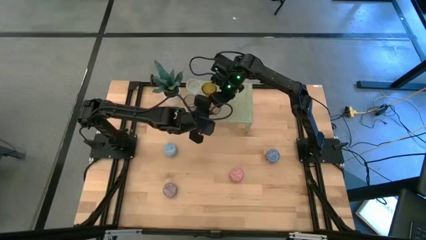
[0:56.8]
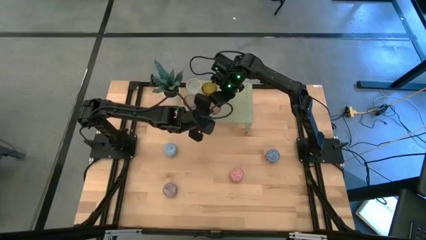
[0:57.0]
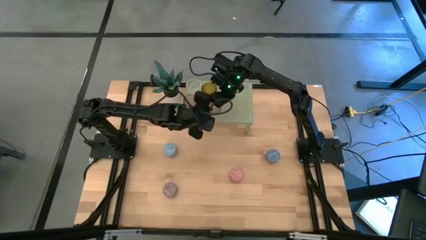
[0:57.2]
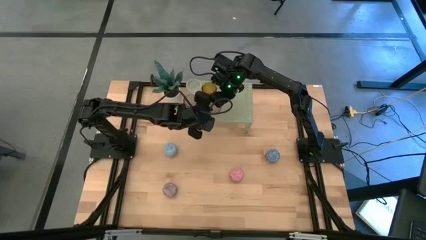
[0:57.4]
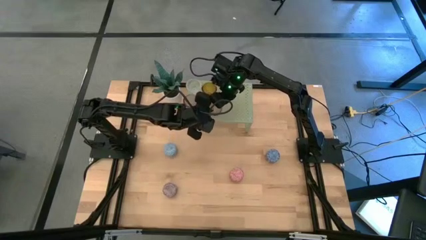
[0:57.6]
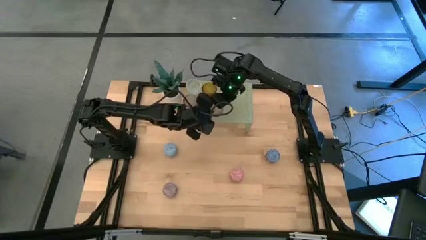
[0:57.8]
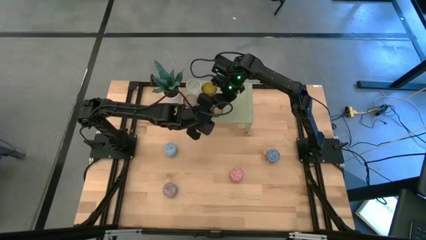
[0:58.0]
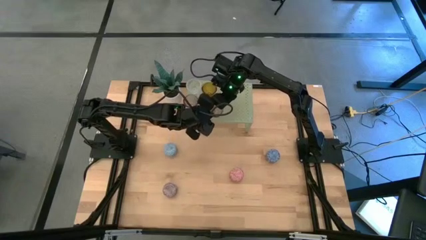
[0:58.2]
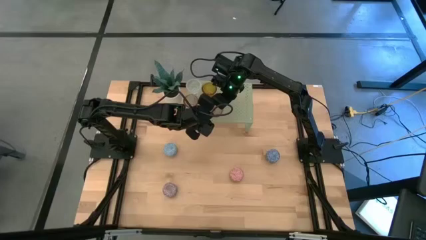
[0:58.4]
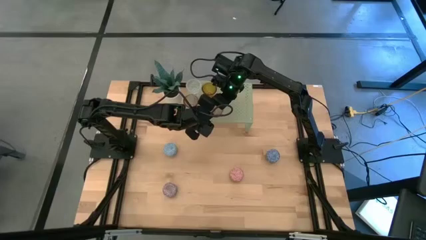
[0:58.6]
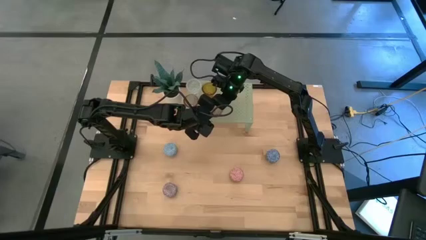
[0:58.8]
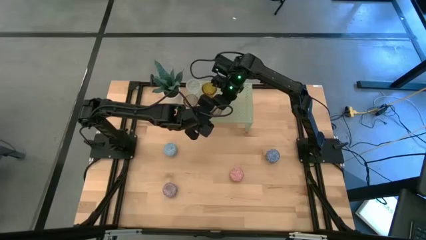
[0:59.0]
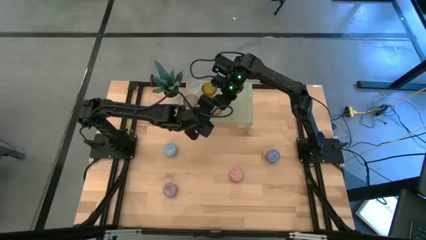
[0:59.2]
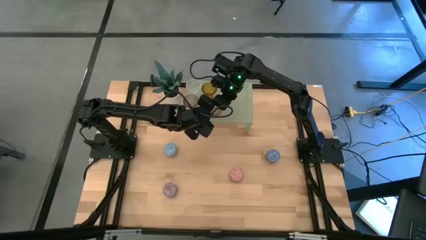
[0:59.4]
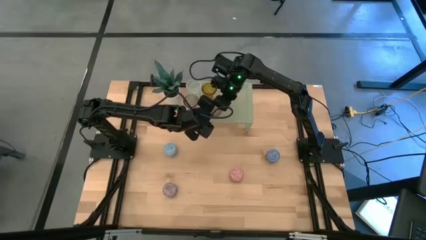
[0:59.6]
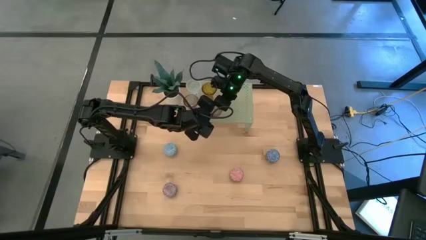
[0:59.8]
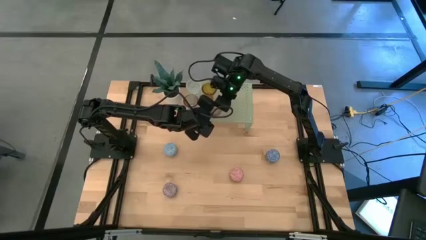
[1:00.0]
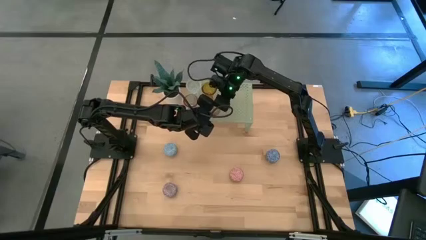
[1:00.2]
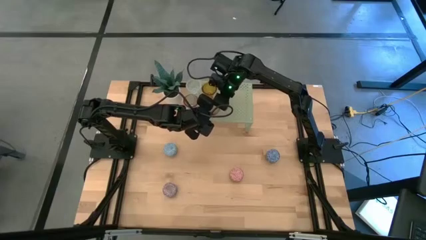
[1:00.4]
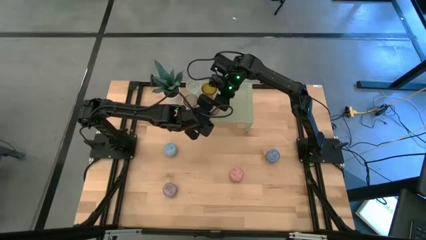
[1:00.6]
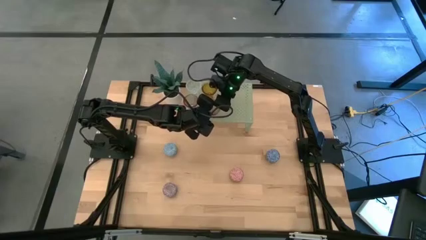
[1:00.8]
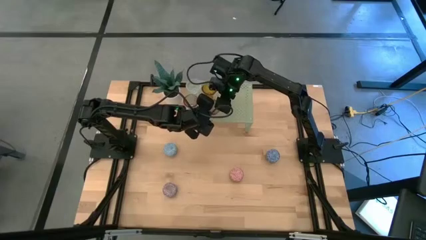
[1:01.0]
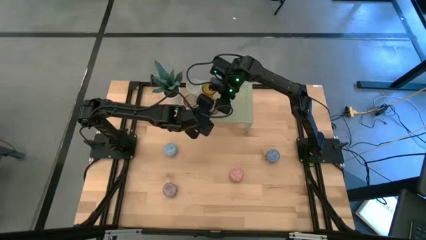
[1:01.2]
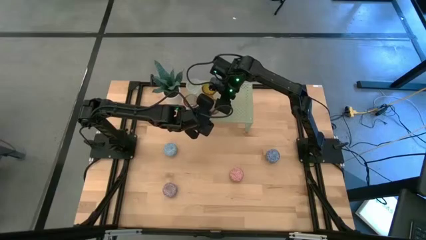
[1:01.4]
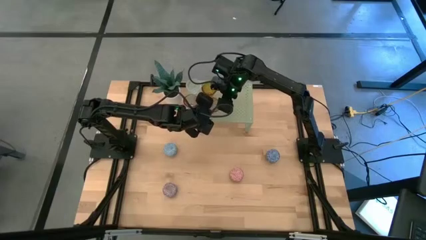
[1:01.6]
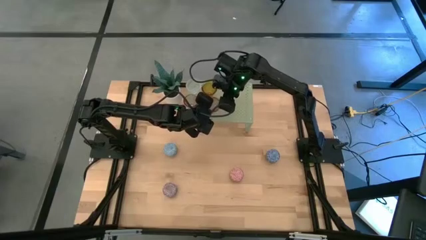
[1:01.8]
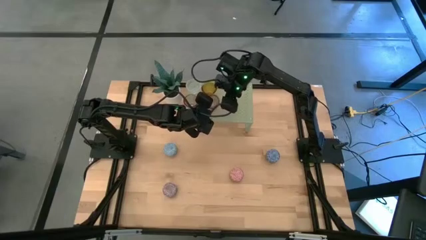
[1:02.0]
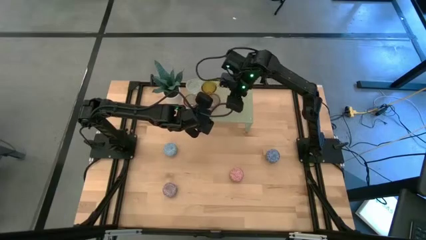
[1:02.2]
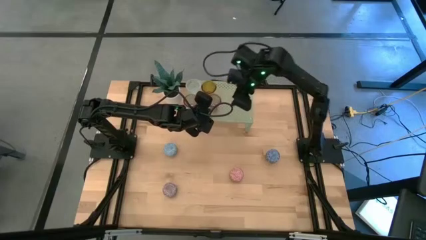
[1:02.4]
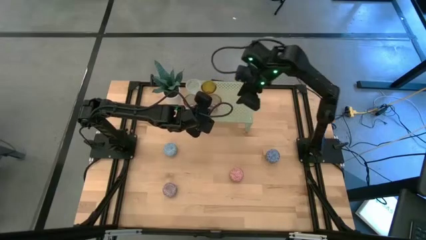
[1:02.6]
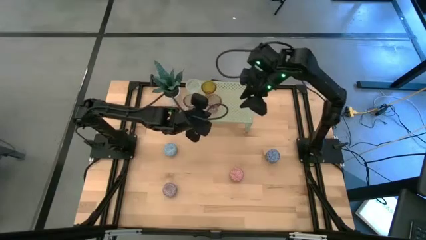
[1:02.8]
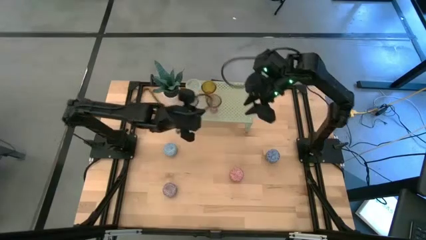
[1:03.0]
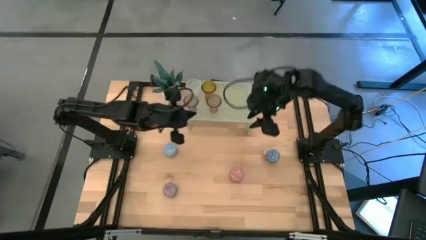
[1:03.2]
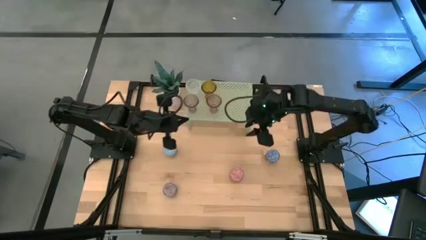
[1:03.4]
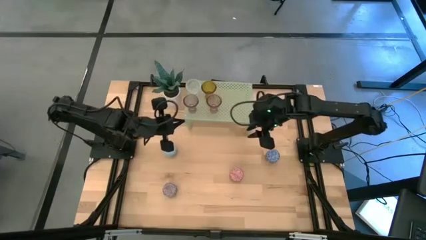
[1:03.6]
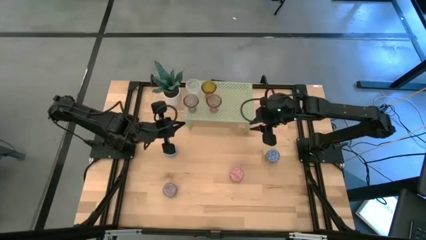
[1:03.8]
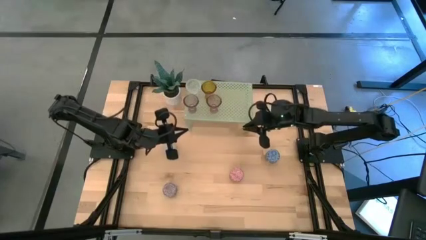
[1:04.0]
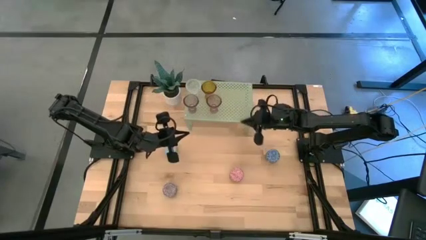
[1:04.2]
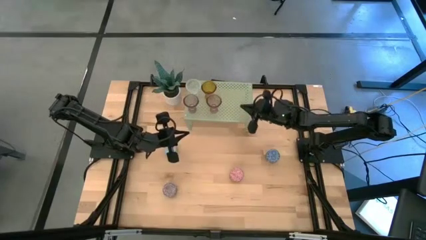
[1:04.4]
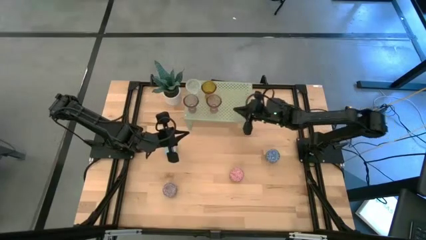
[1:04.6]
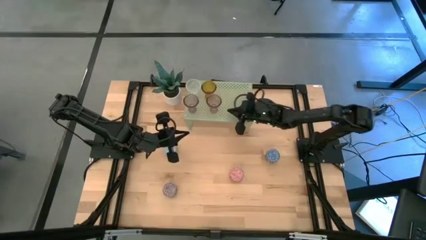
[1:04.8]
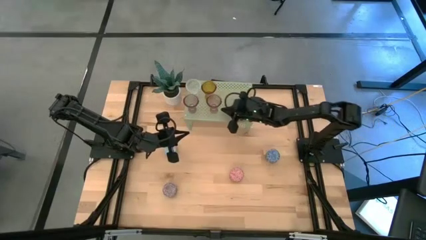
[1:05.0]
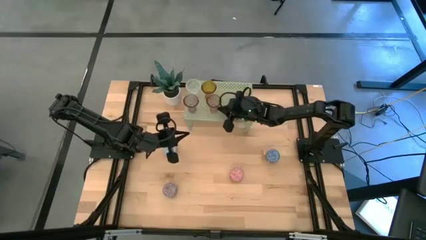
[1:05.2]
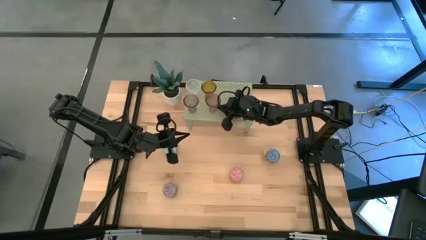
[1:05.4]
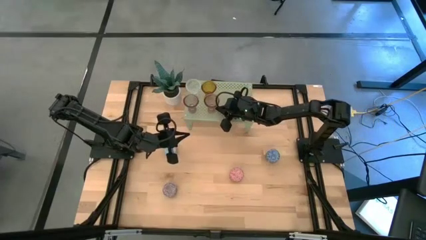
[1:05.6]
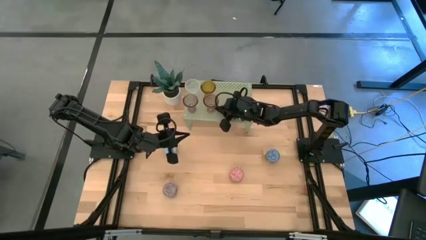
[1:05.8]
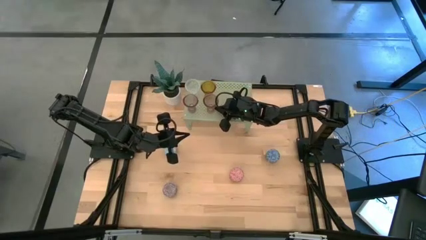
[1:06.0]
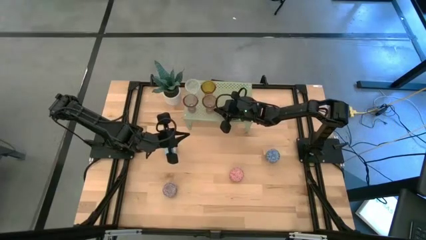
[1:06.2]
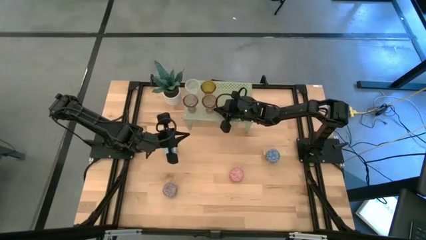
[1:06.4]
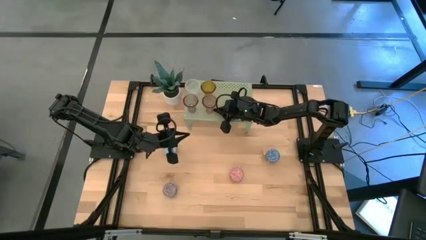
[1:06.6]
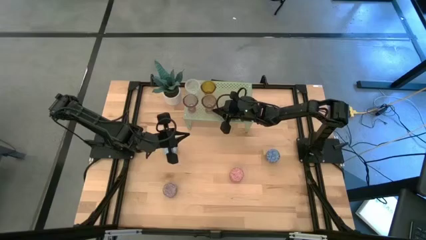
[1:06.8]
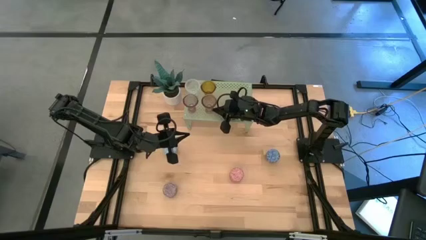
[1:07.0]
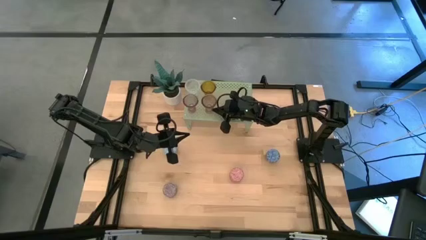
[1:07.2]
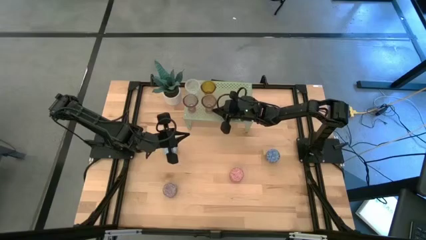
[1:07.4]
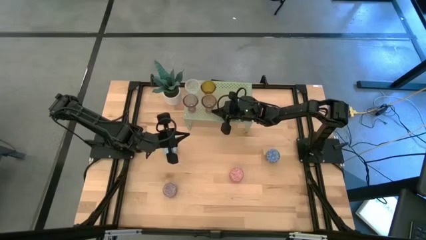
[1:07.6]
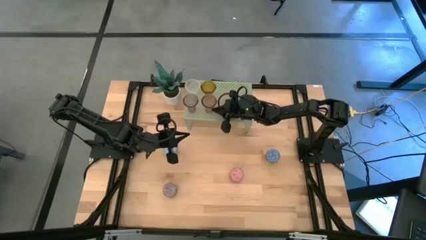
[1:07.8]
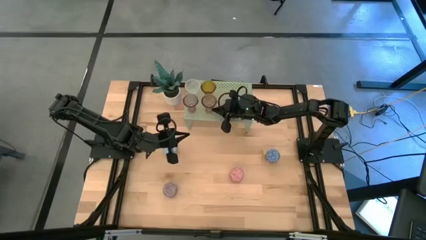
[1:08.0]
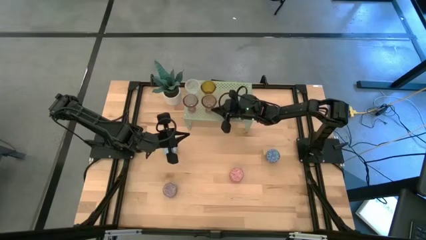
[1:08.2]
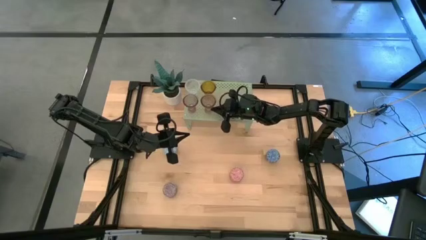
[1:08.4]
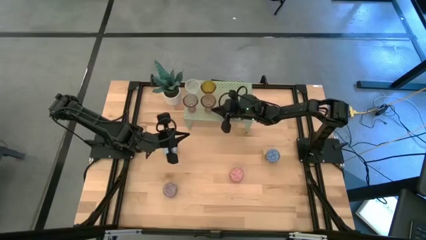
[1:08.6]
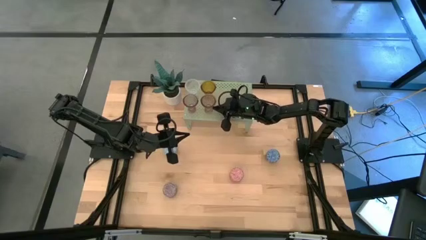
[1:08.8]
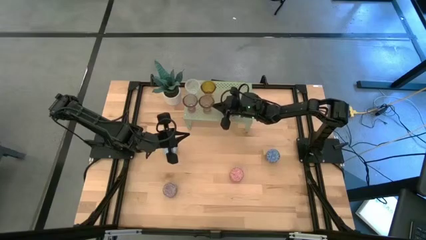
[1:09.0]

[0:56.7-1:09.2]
Task: Pick & Place candle stick holders
Put the pink glass candle holder on the shelf

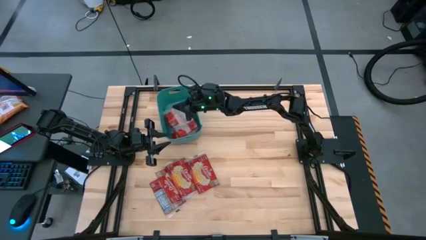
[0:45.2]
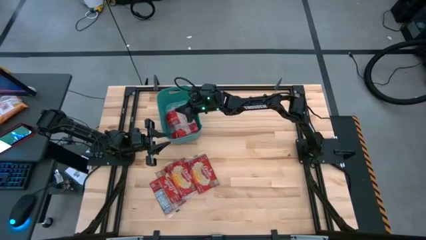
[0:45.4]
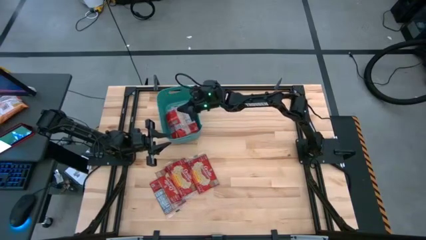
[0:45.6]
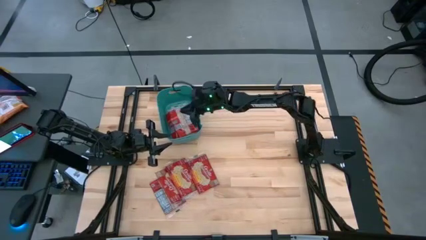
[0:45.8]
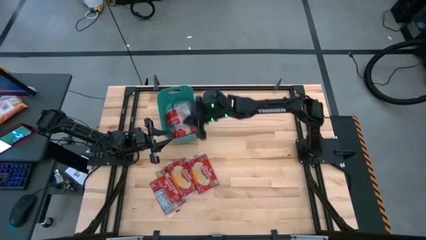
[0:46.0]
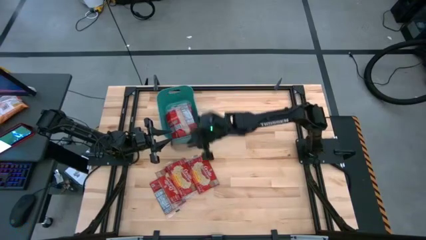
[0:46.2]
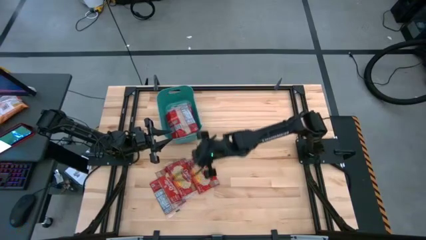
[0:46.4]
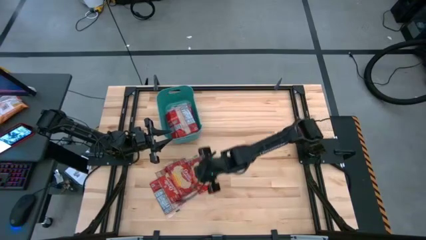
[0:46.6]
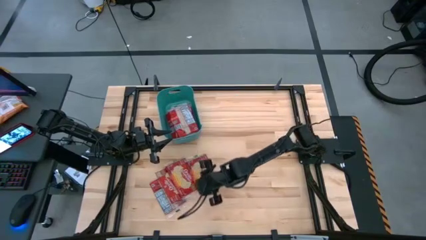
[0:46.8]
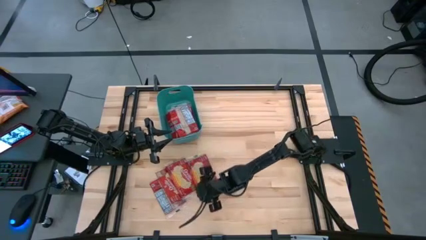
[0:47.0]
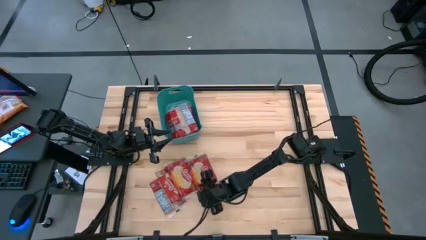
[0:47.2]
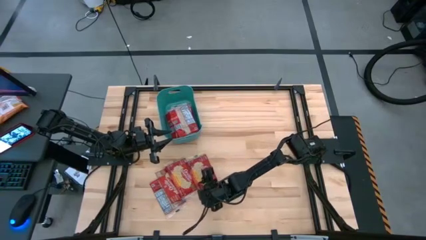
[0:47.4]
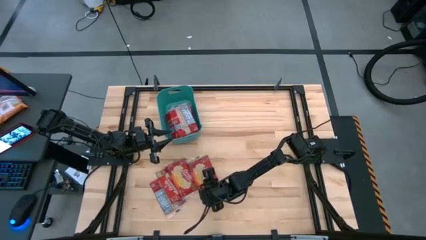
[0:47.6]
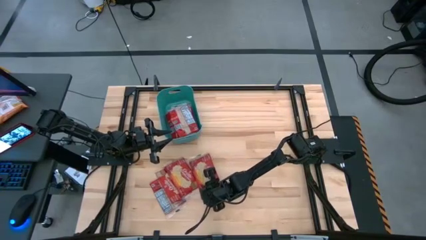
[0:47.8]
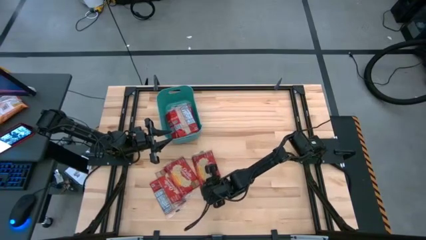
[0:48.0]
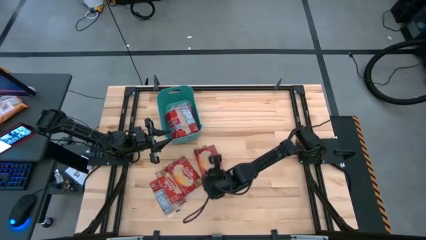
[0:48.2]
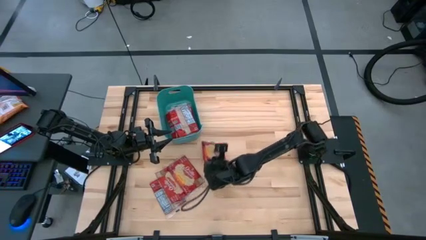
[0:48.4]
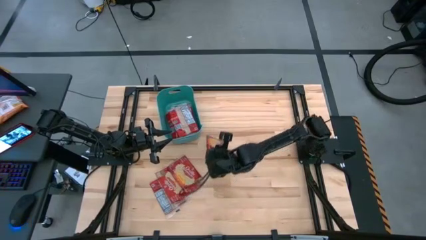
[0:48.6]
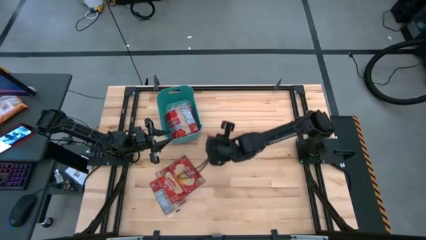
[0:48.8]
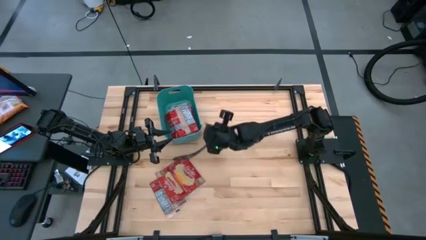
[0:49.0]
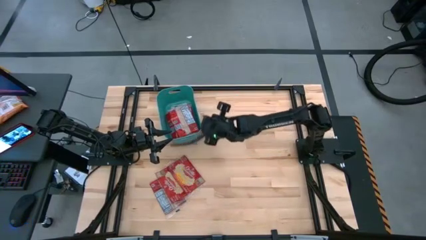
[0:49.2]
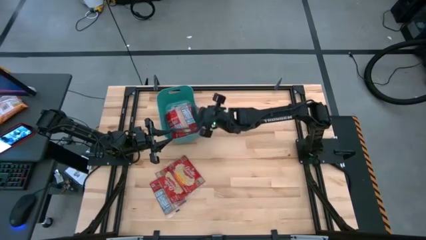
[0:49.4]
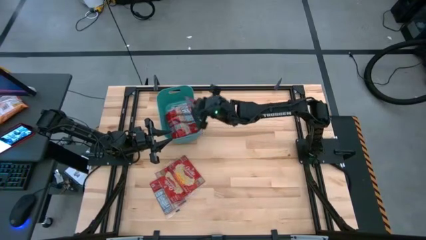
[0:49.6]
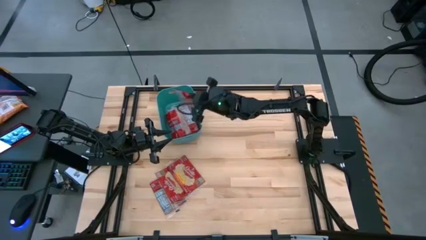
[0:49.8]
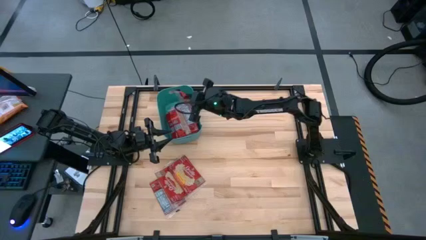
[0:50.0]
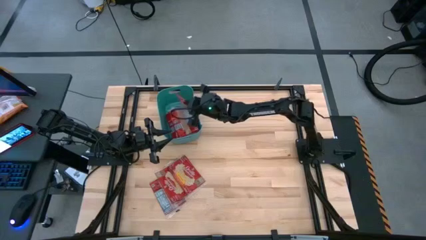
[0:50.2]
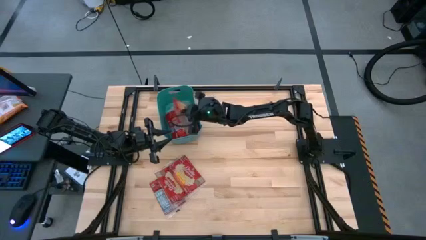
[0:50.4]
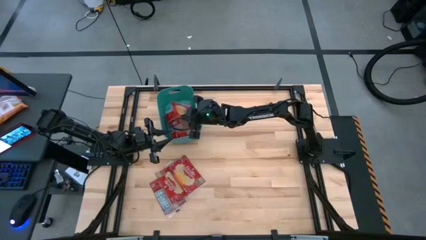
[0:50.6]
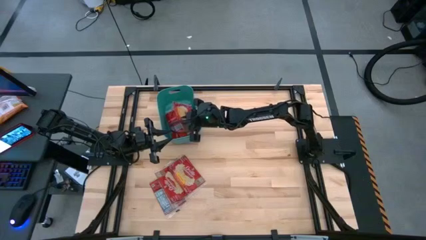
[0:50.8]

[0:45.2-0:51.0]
Task: Sort popcorn bags into baskets
Put the red popcorn bag into the green bin
